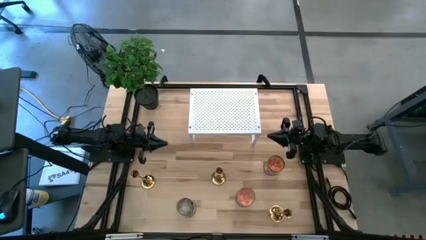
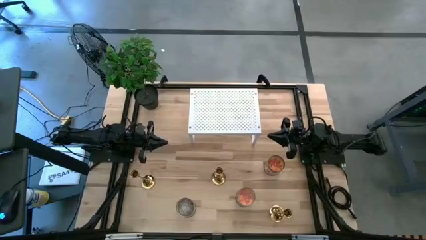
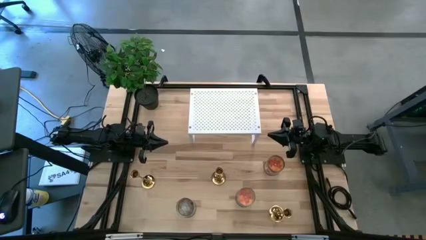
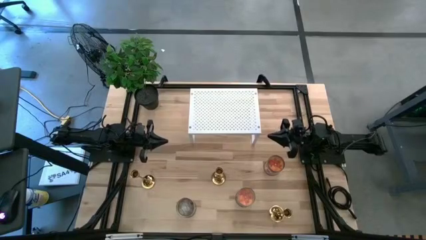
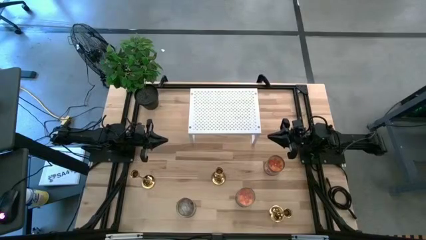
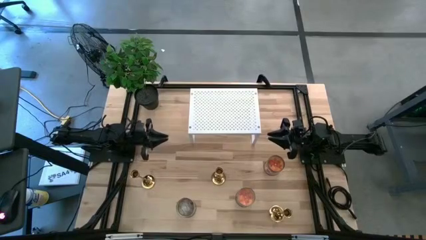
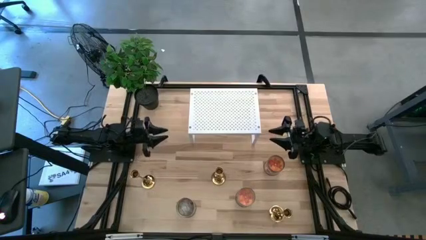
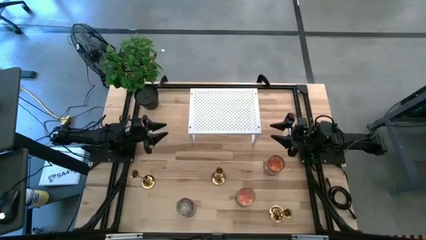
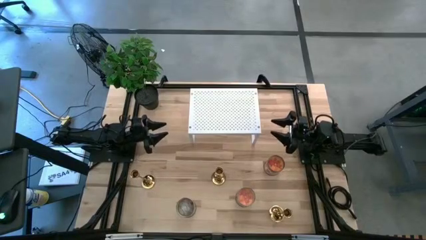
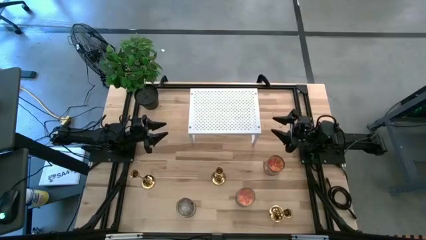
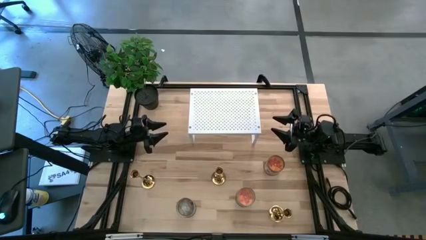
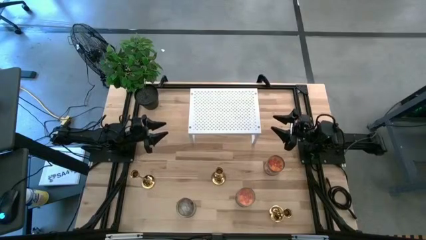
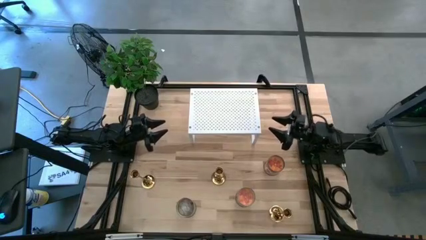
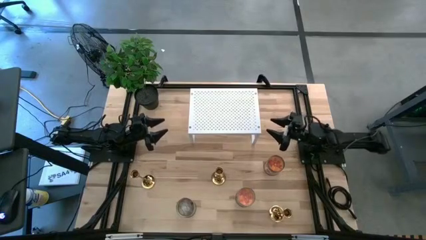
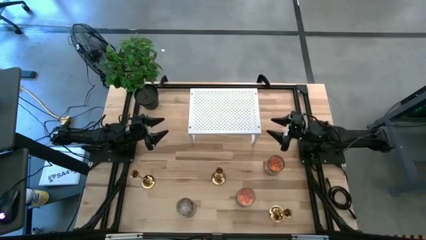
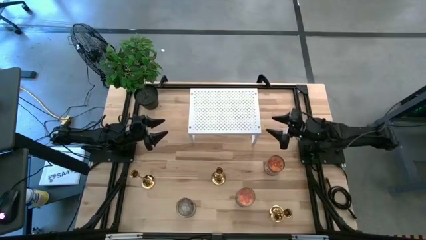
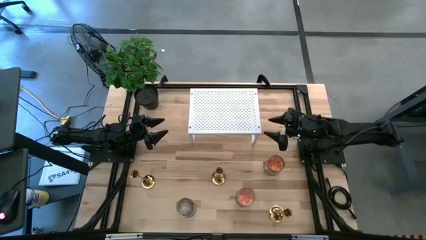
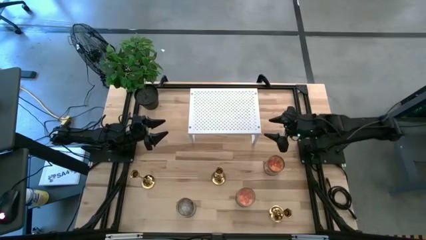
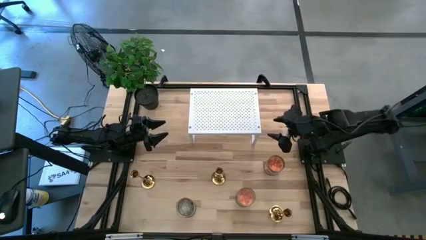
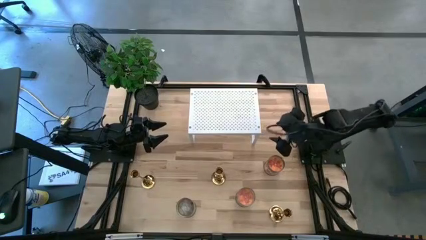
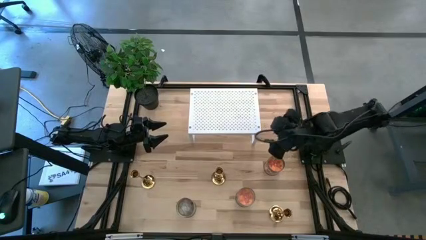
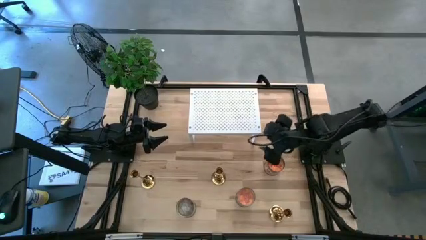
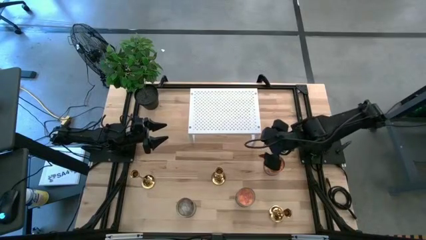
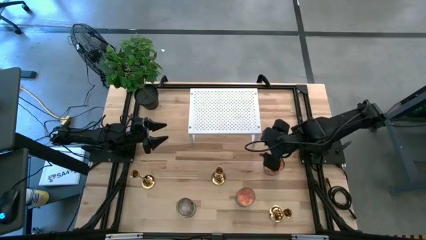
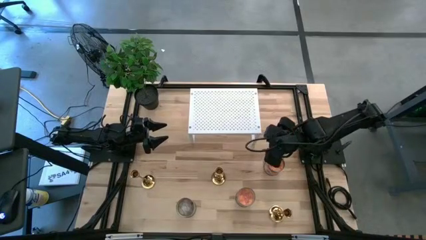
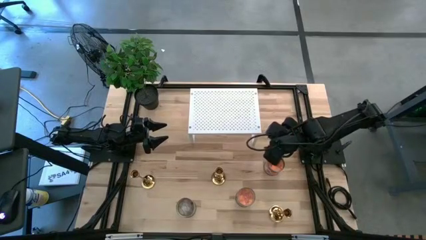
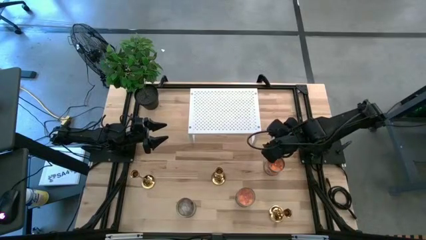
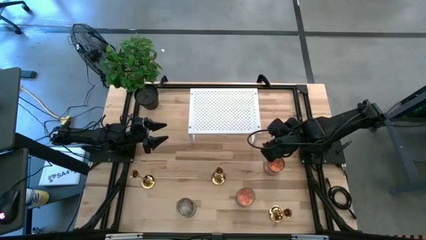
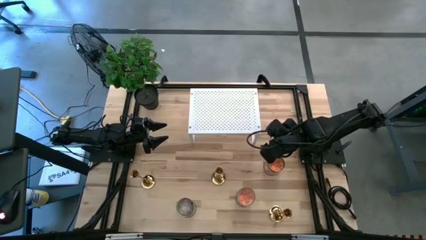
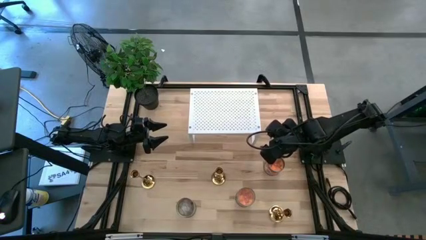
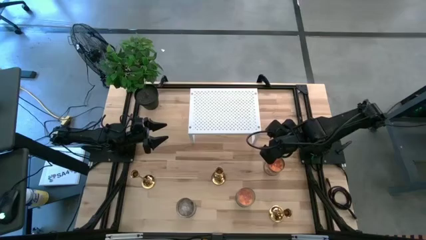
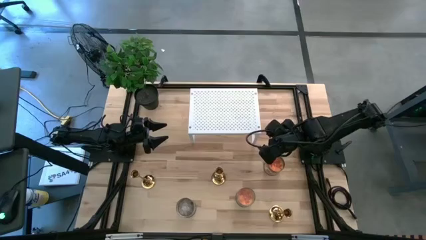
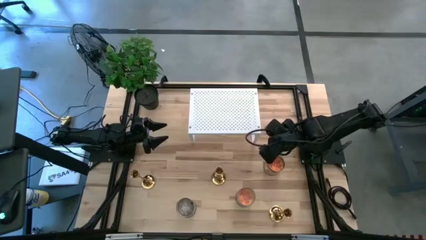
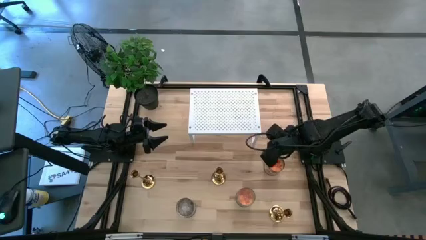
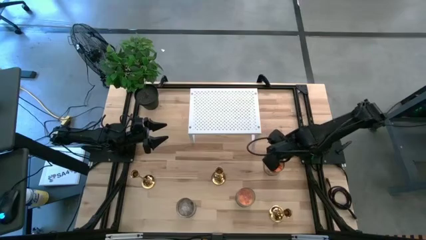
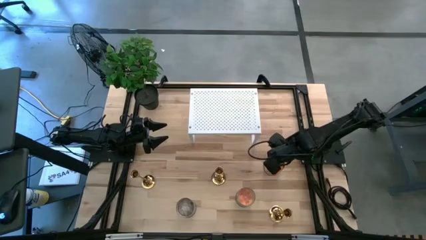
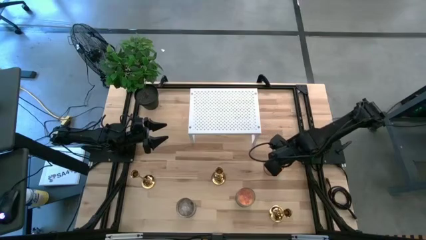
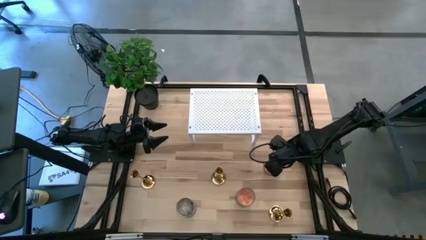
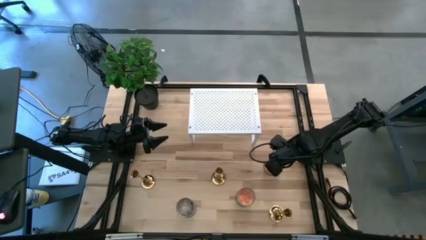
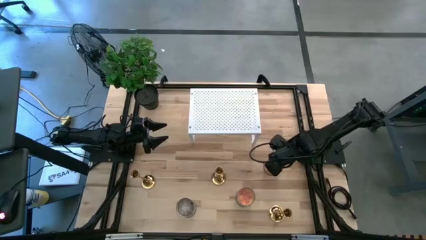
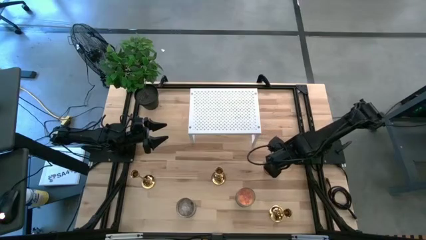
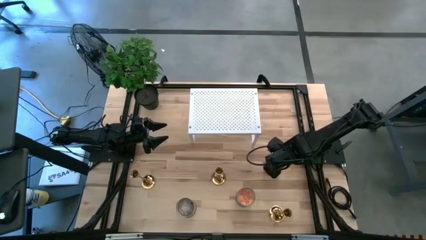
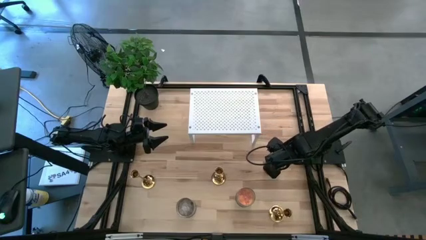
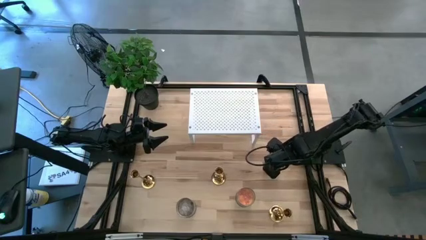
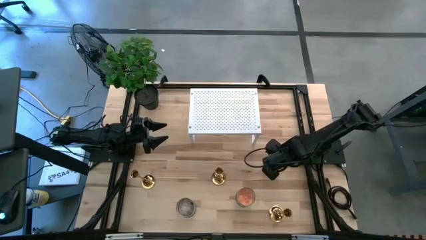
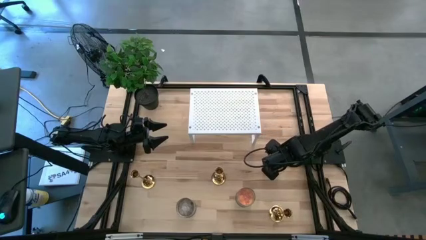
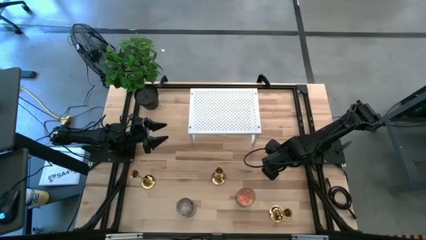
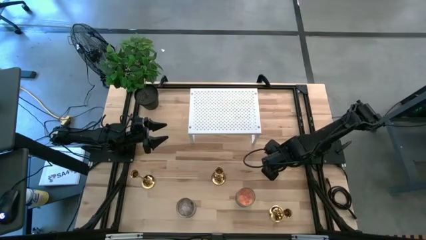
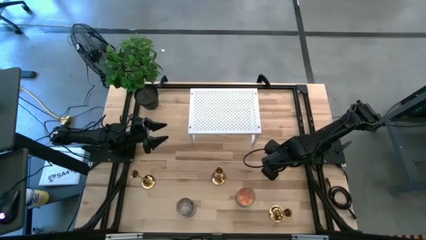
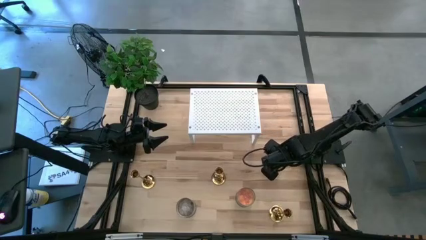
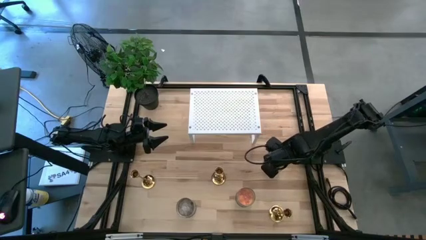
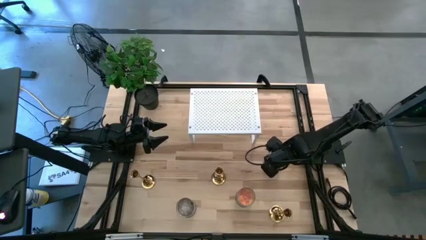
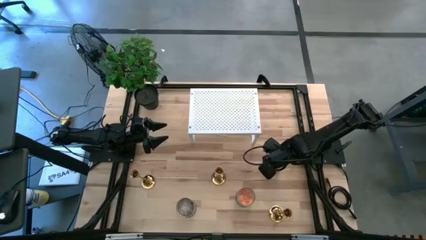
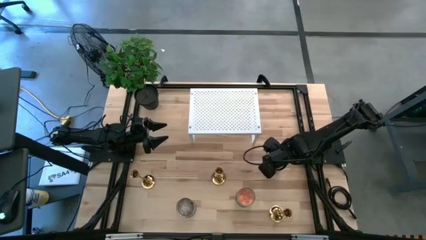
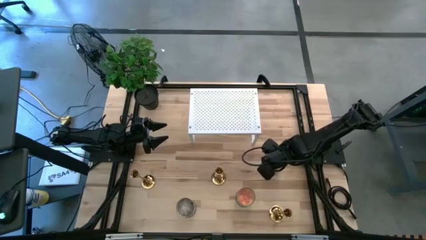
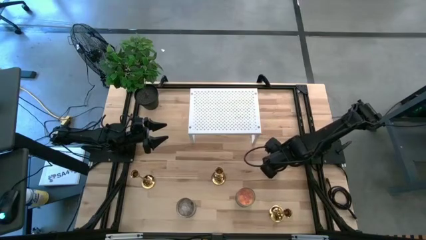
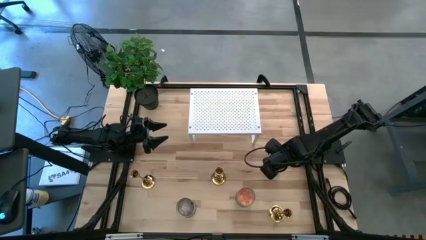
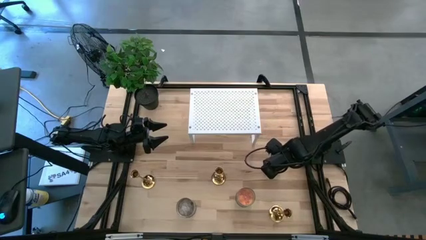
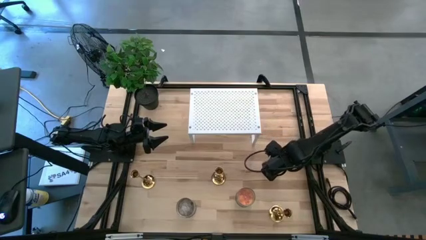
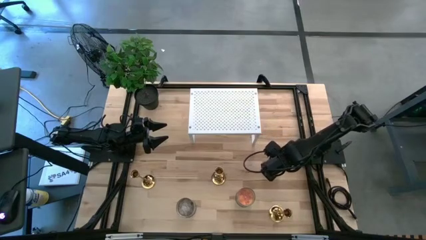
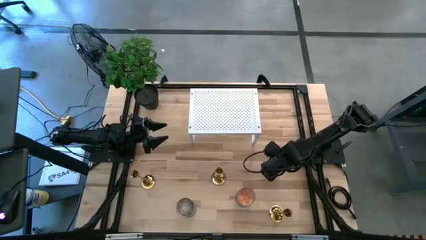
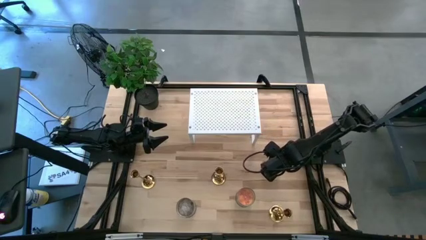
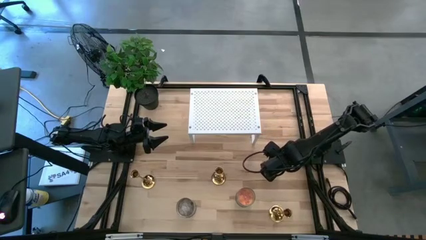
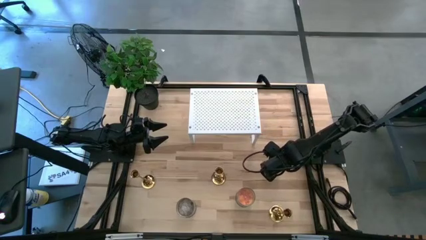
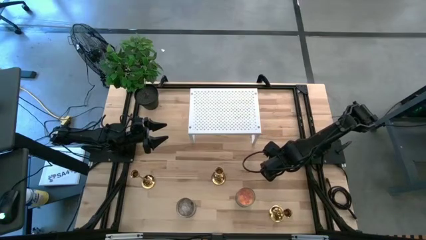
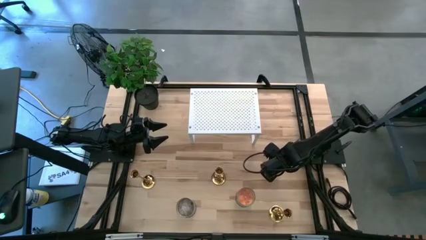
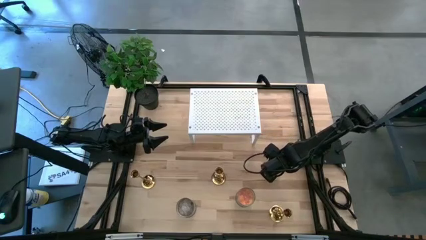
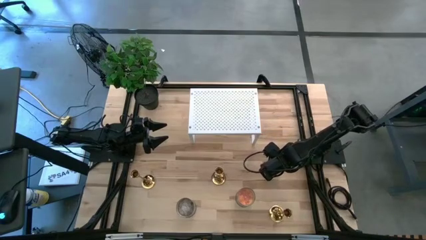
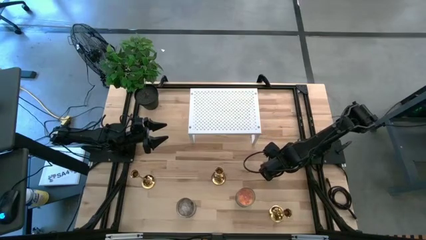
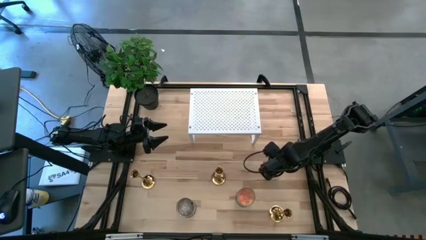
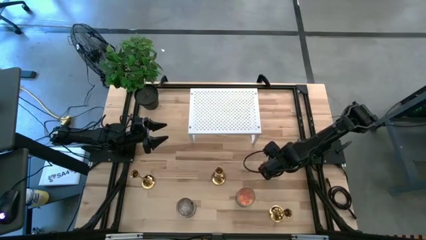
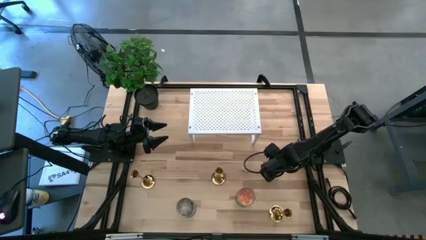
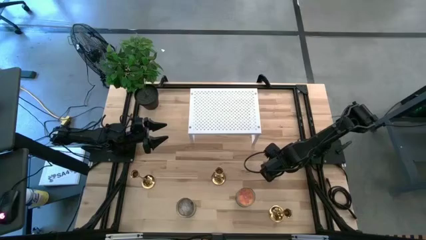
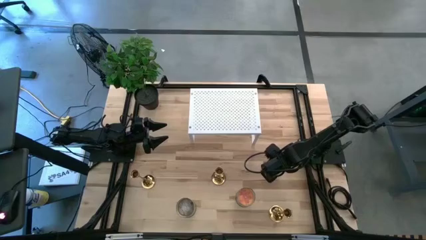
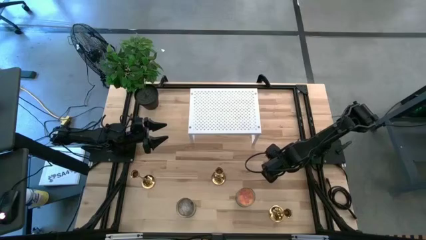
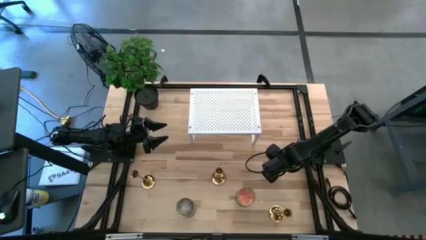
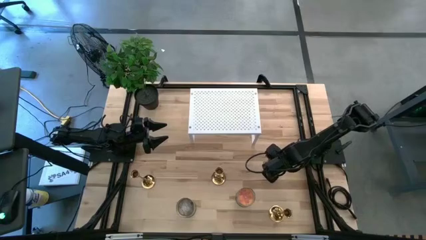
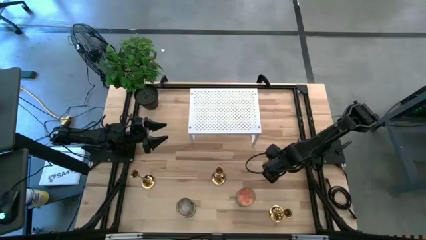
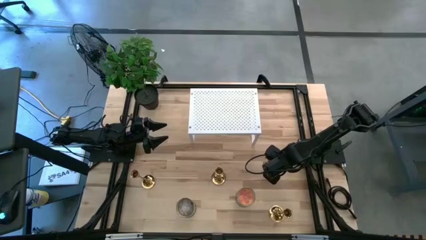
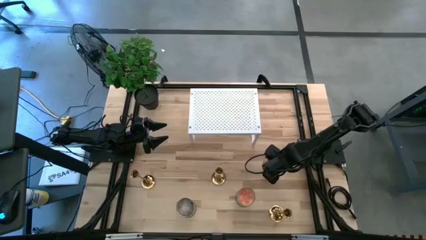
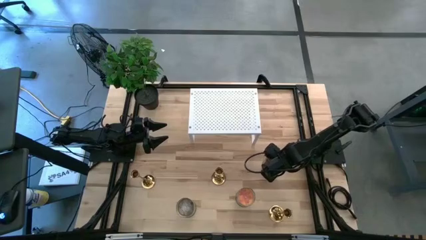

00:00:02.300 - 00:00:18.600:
Task: Pick & Place candle stick holders
Put the top right orange scented candle on the shelf
